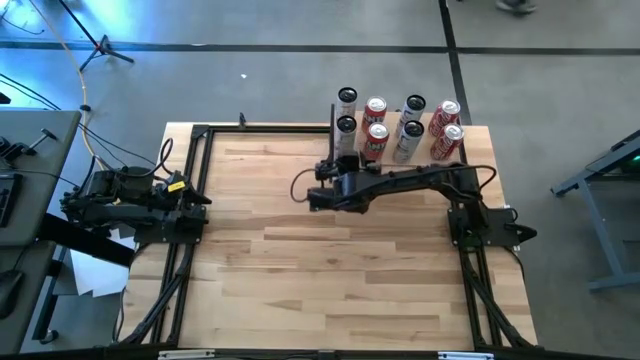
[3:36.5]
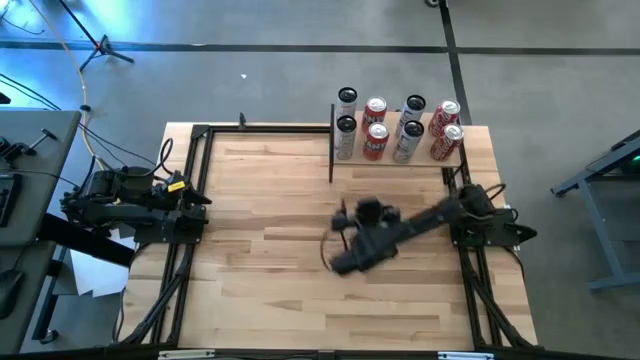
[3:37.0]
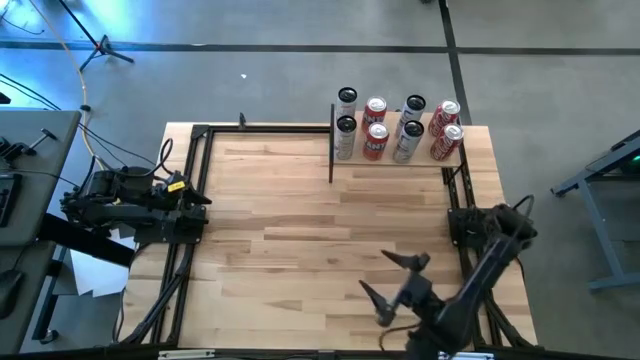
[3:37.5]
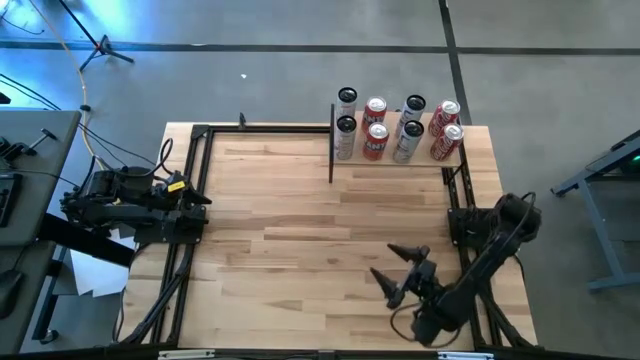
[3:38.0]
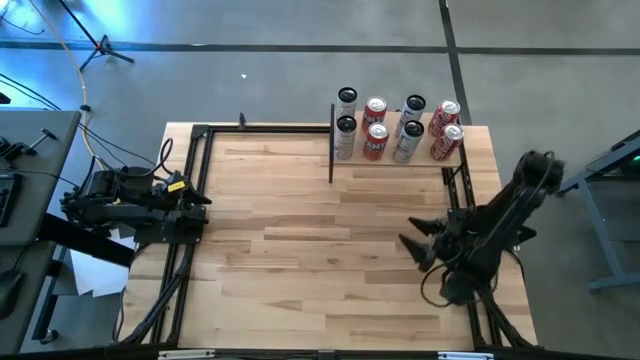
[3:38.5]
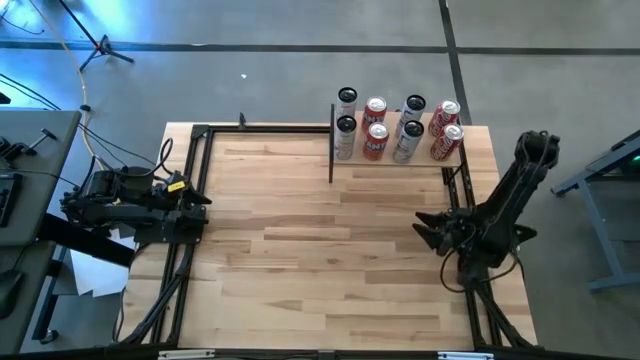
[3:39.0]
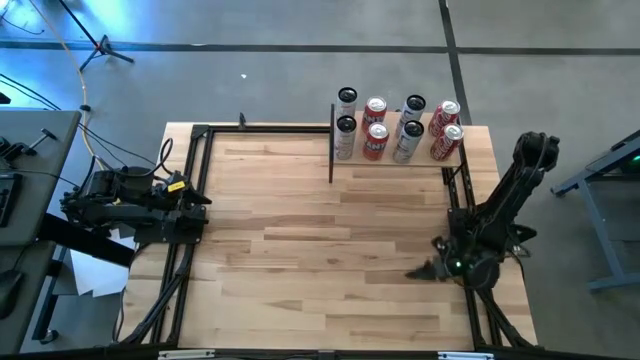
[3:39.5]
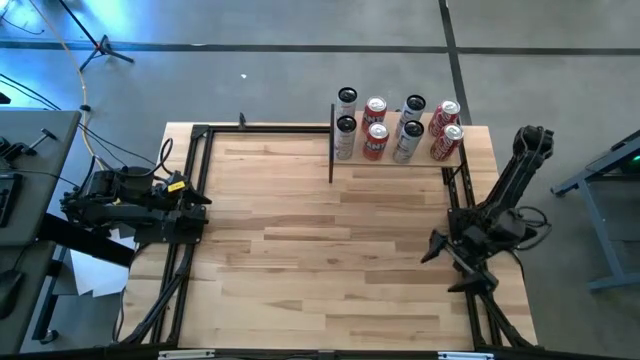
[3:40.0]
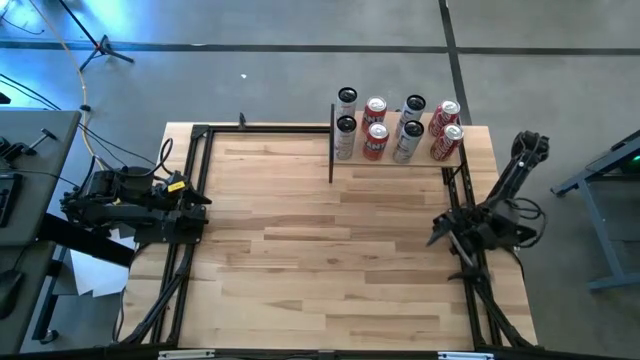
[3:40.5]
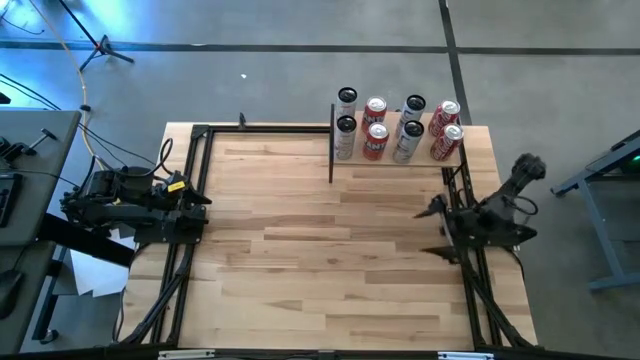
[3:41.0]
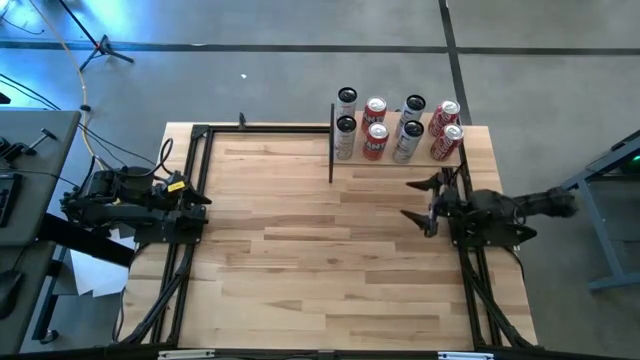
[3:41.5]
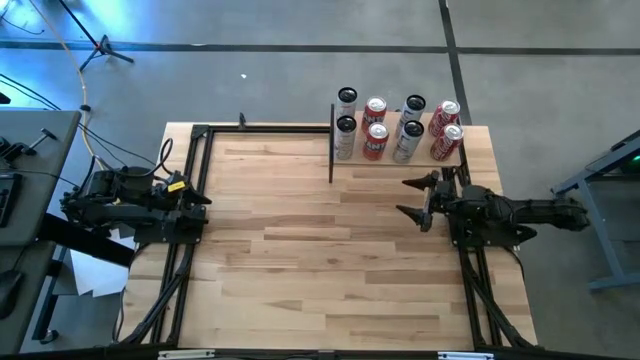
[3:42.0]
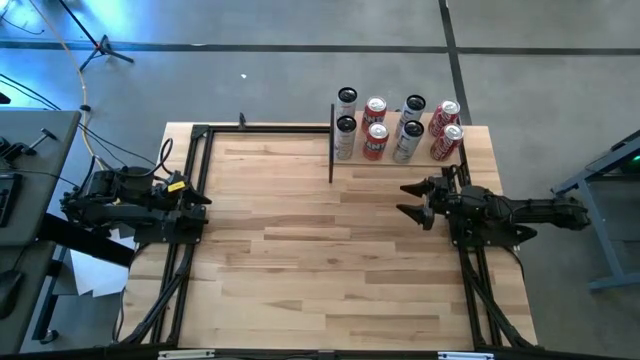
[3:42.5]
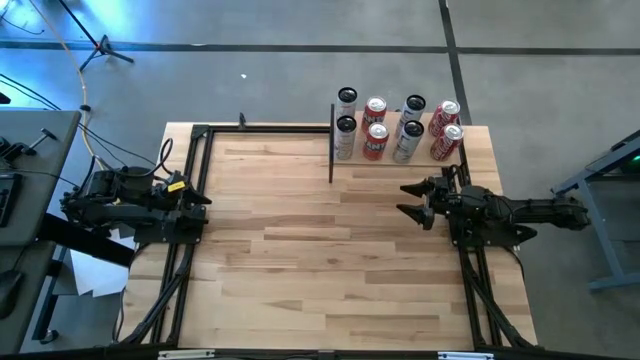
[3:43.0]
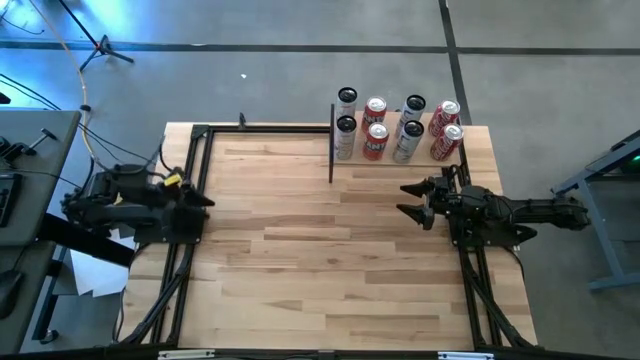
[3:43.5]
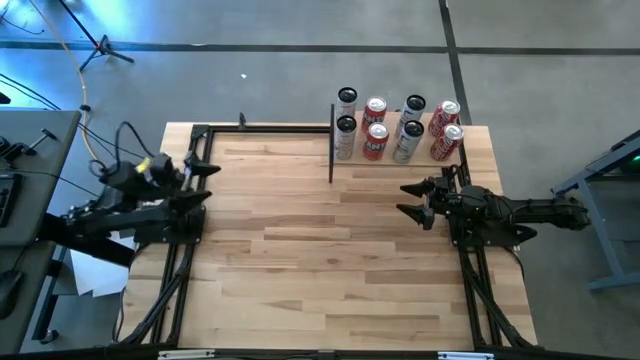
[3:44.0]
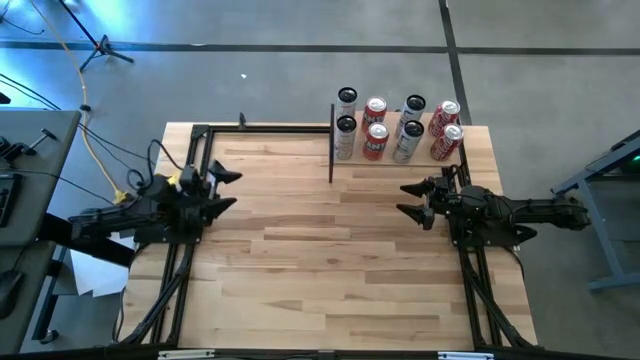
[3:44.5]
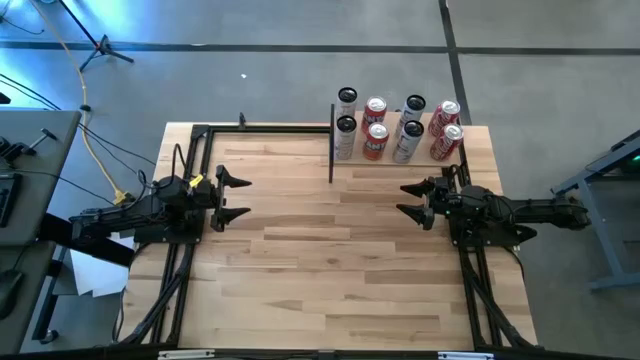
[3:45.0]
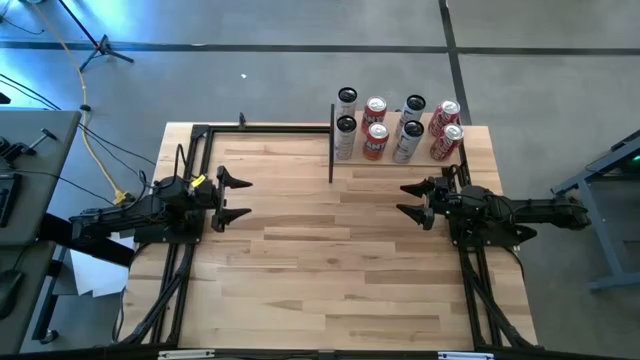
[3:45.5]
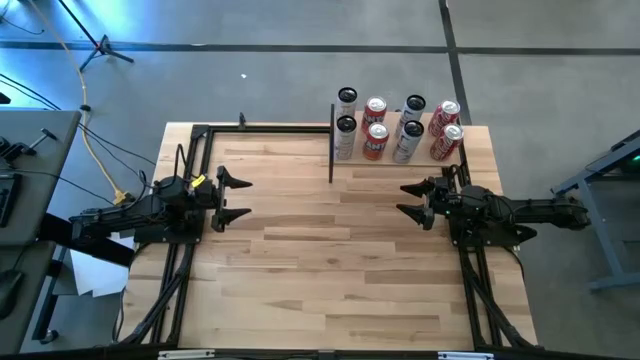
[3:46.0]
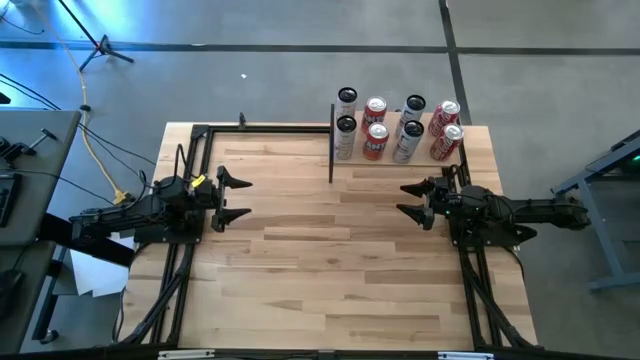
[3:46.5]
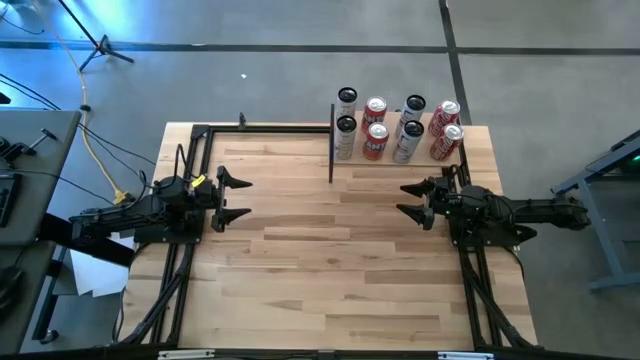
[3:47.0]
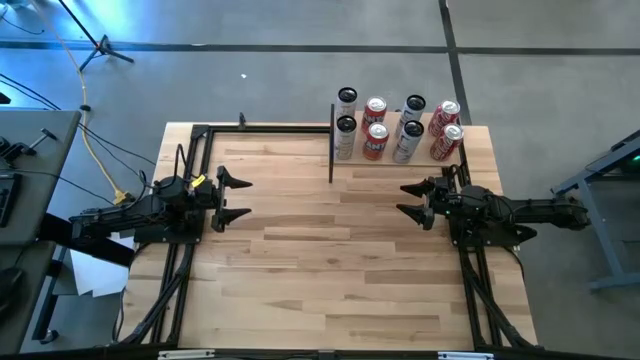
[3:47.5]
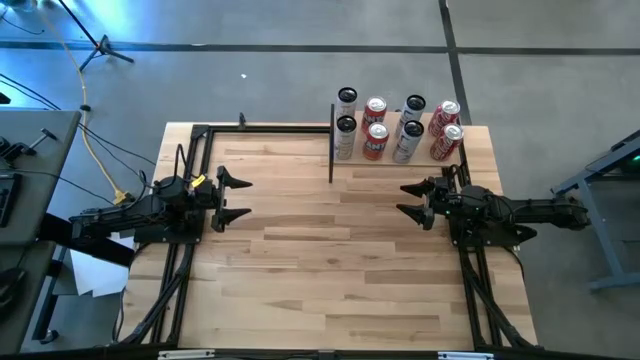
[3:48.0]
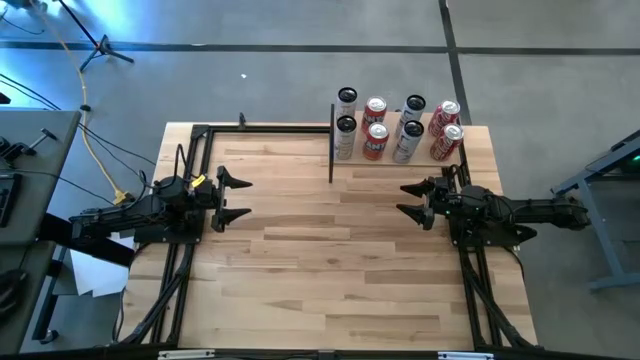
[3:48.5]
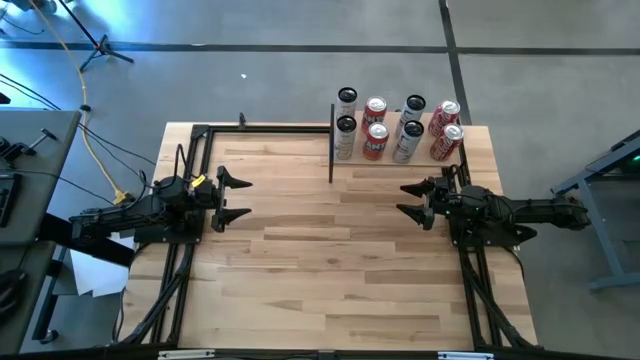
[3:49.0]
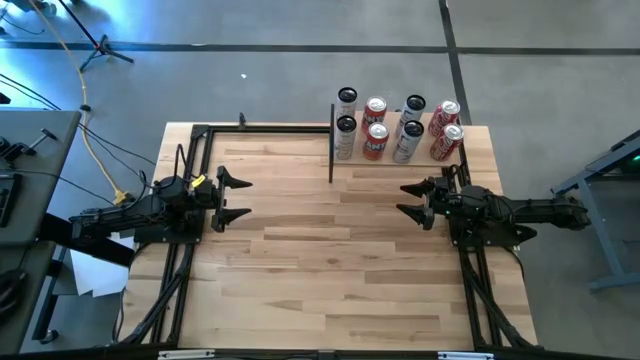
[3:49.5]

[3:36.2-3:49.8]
Task: Place canned beverage on shelf
Return to Home Position

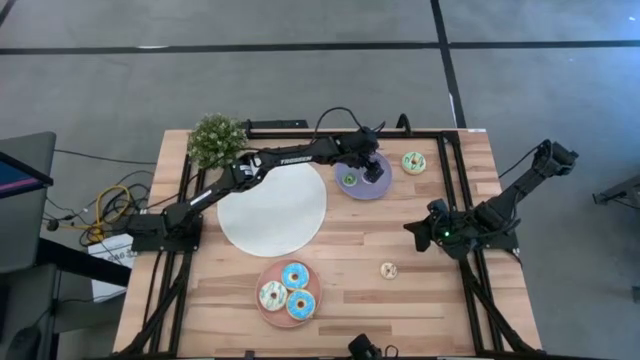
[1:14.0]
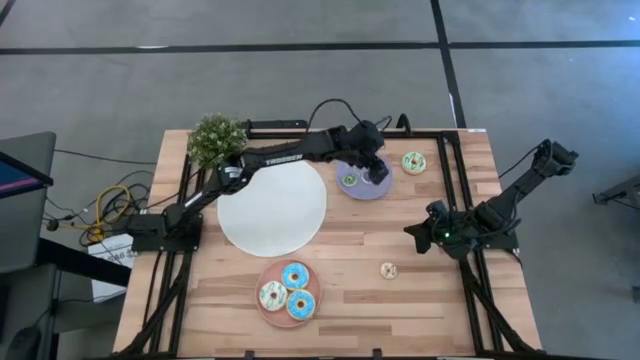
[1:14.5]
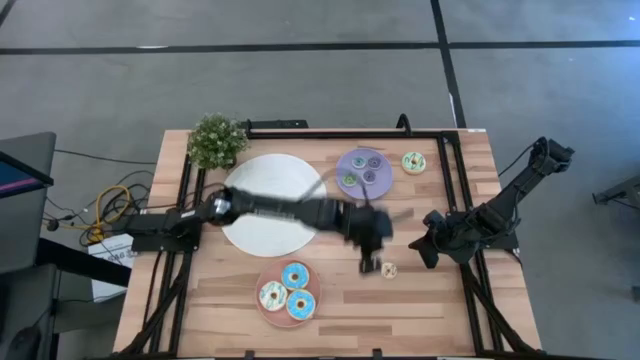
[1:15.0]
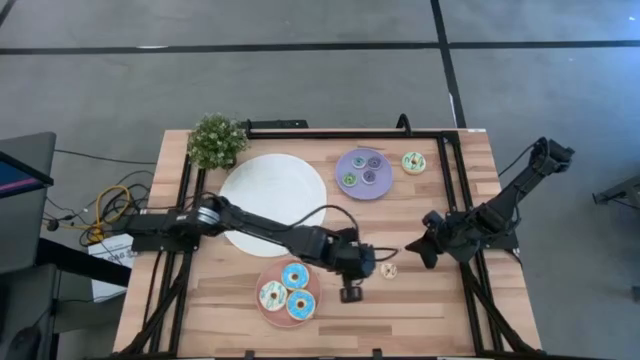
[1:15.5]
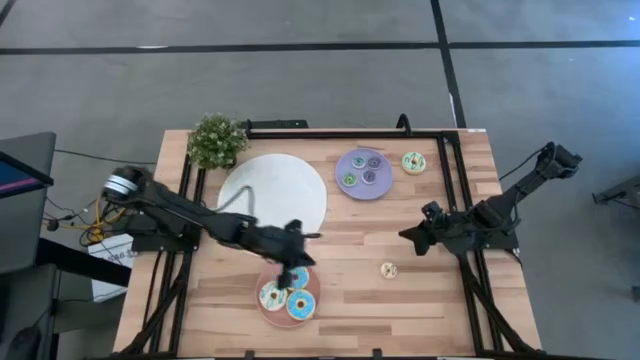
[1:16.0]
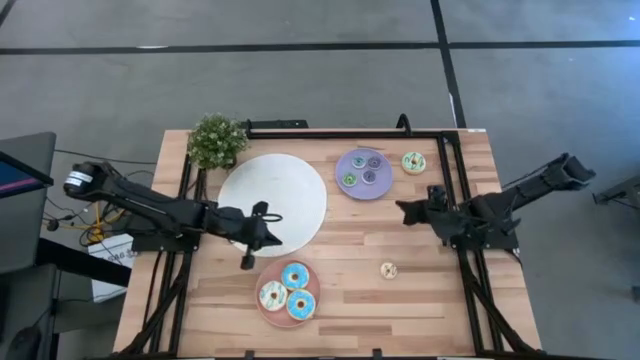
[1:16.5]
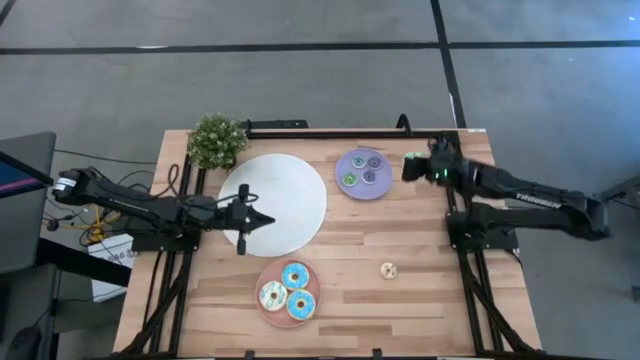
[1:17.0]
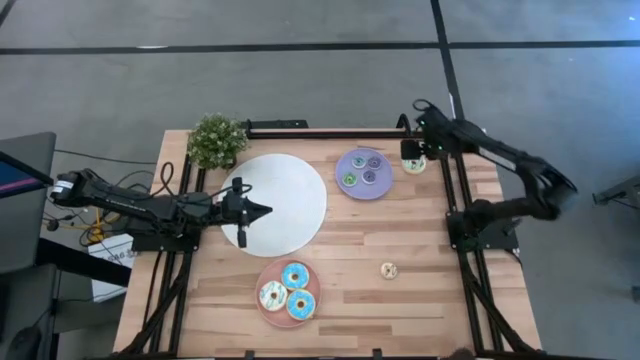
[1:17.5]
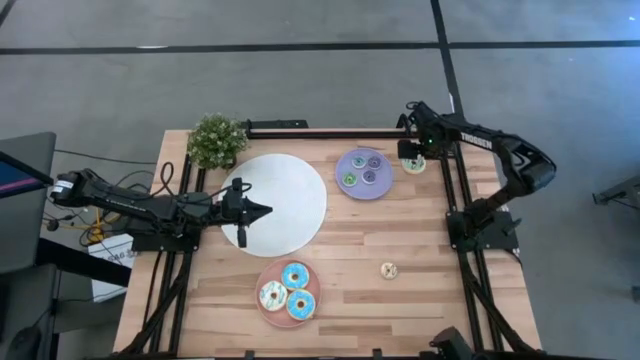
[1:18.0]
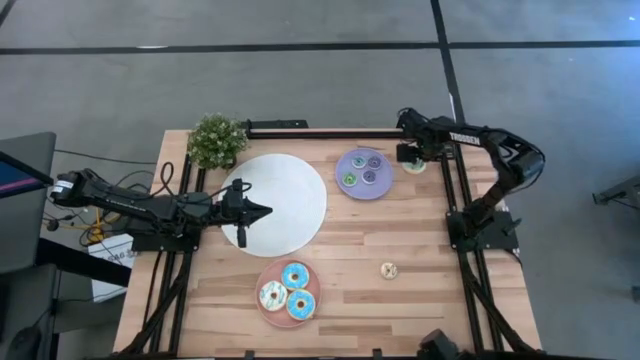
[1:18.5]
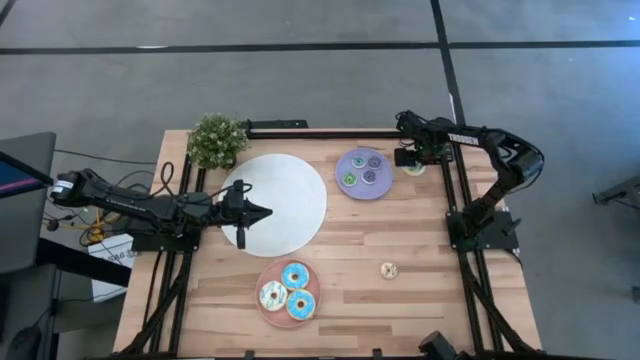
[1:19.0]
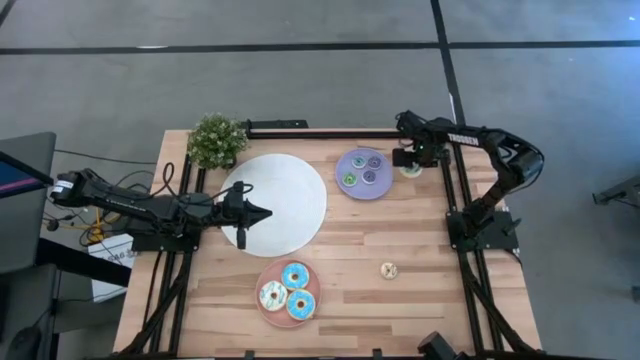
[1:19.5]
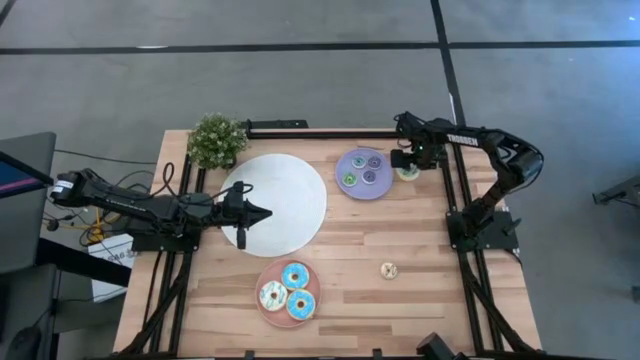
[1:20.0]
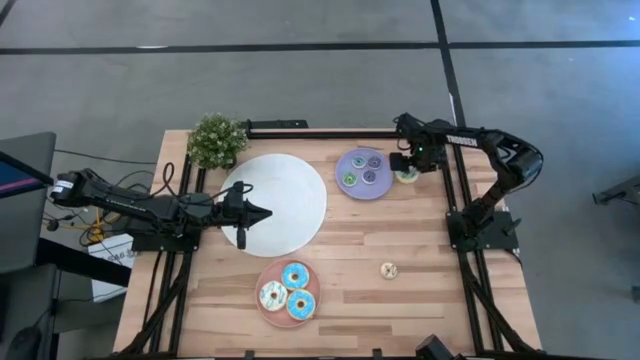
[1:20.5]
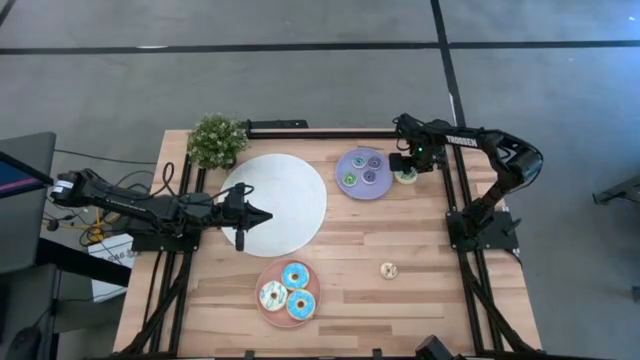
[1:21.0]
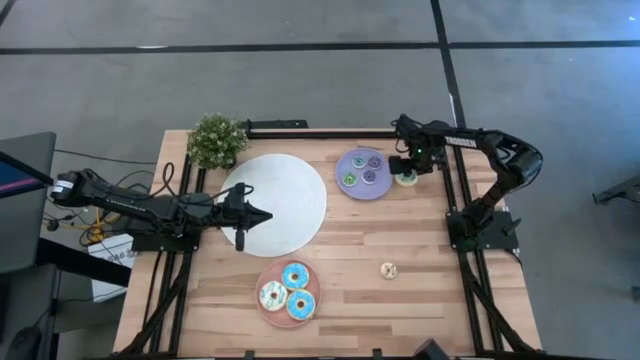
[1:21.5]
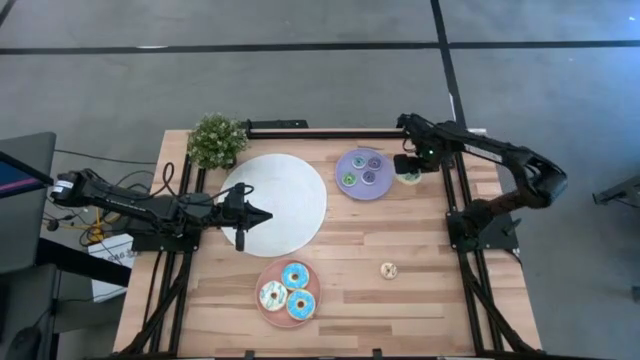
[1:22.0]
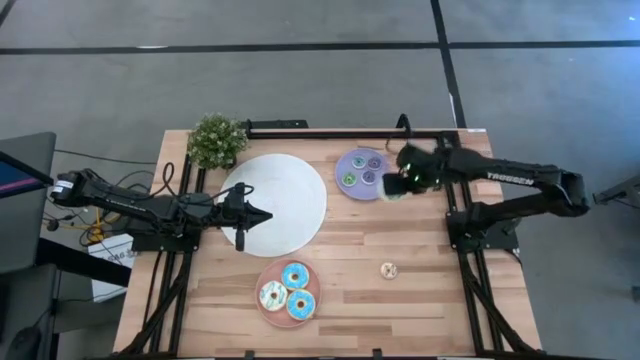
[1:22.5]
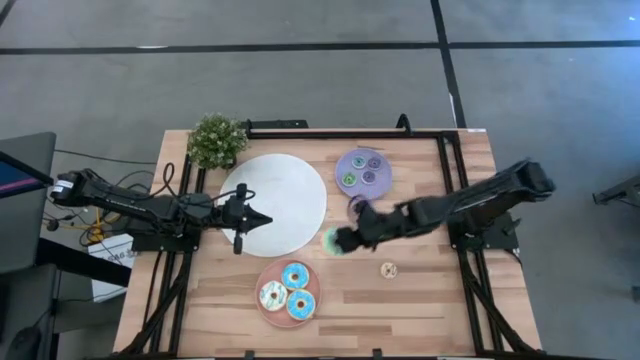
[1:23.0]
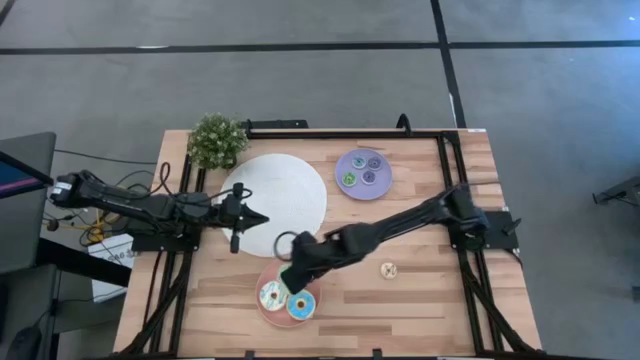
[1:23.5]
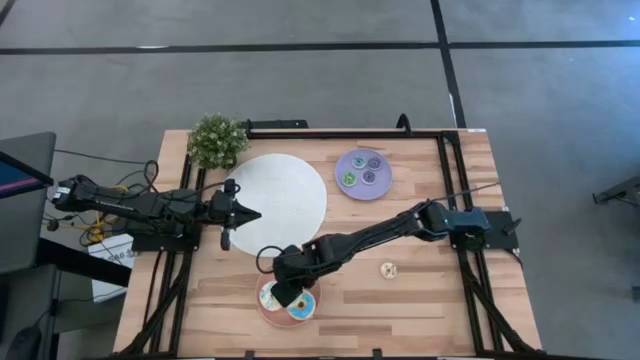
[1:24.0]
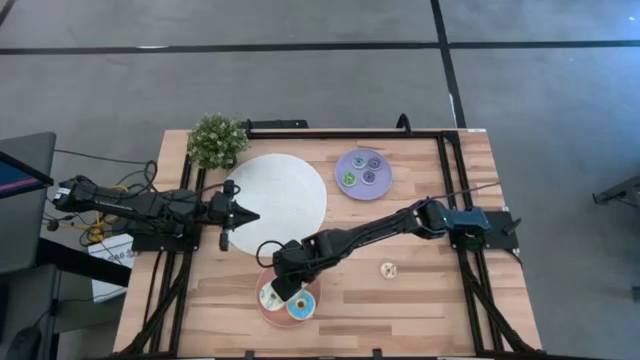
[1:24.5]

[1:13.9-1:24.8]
Task: Pick & Place donuts
Put the large light green donut on the pink plate
